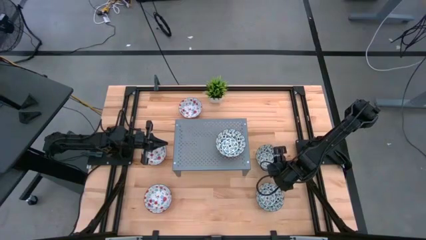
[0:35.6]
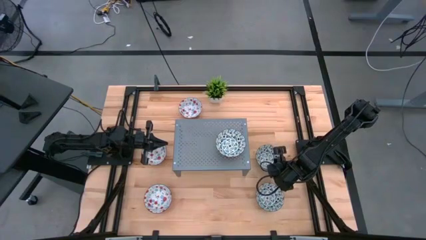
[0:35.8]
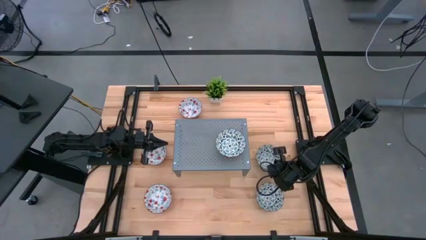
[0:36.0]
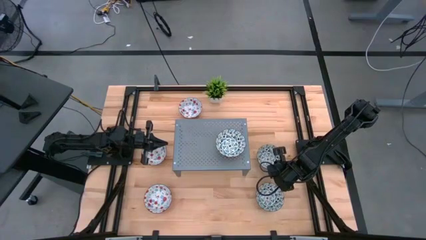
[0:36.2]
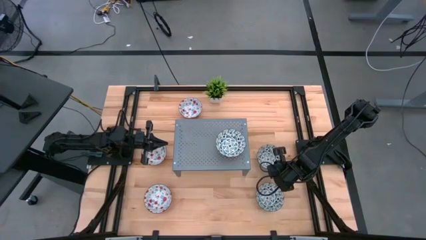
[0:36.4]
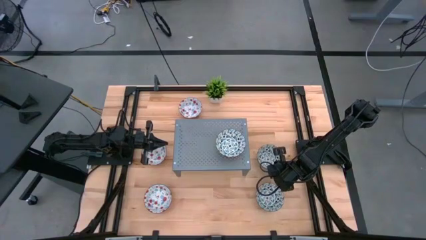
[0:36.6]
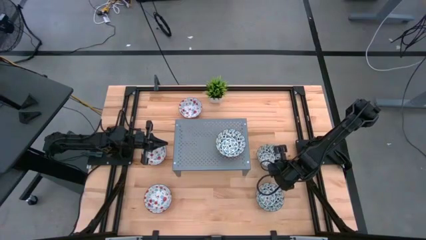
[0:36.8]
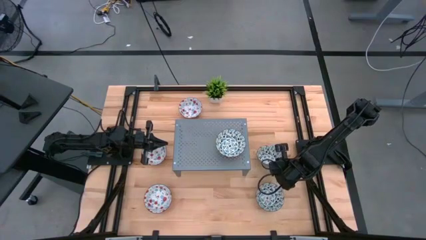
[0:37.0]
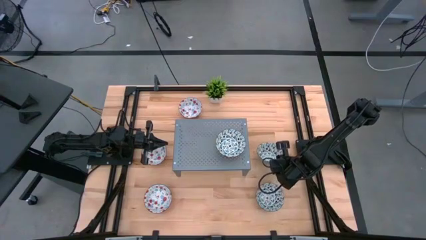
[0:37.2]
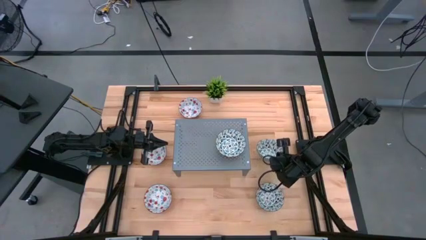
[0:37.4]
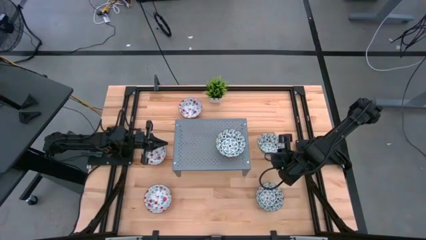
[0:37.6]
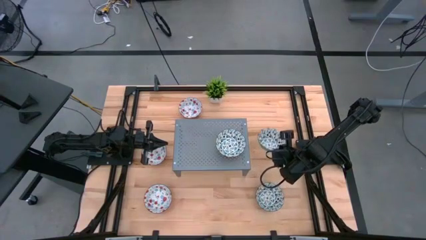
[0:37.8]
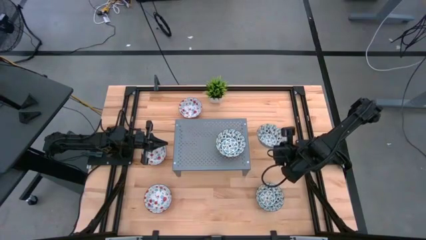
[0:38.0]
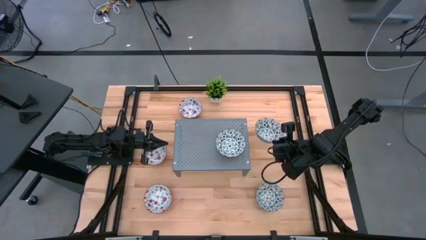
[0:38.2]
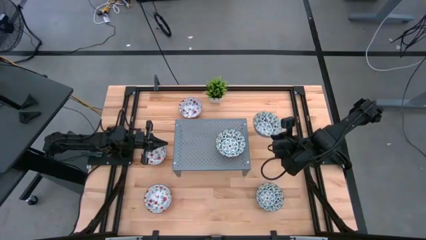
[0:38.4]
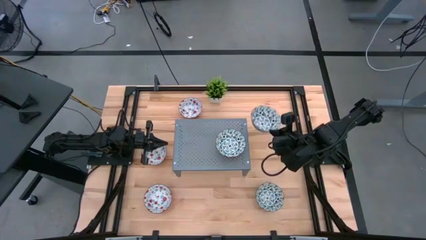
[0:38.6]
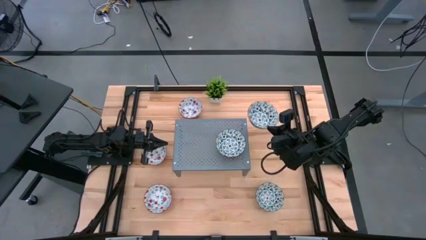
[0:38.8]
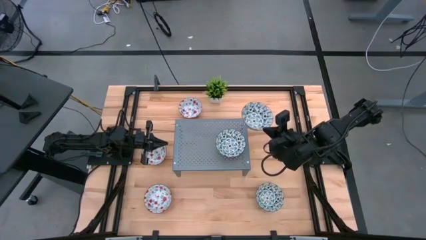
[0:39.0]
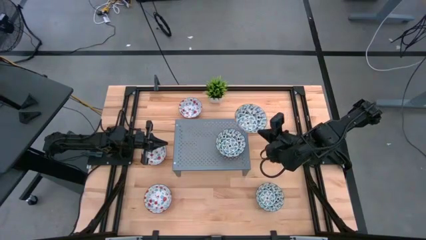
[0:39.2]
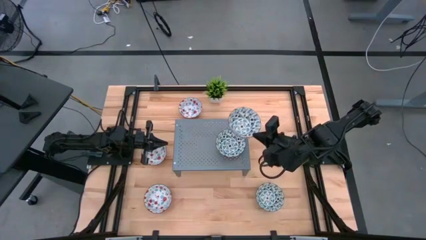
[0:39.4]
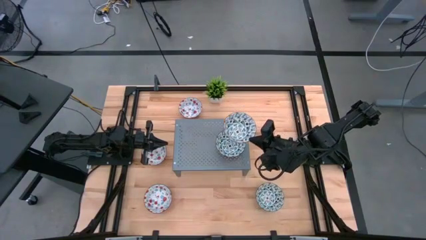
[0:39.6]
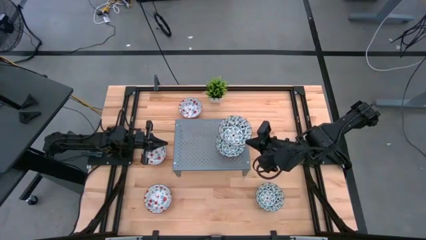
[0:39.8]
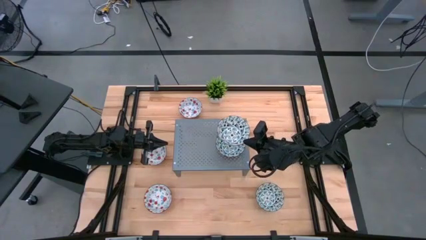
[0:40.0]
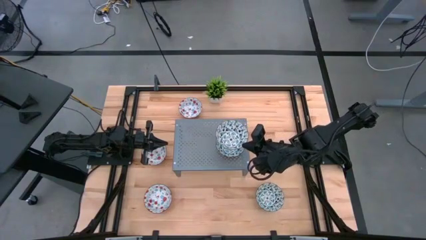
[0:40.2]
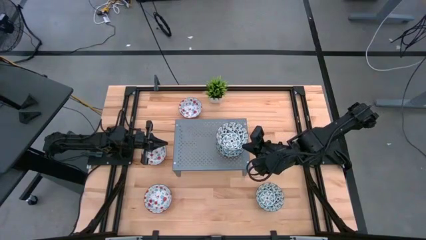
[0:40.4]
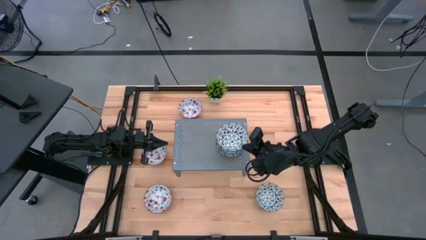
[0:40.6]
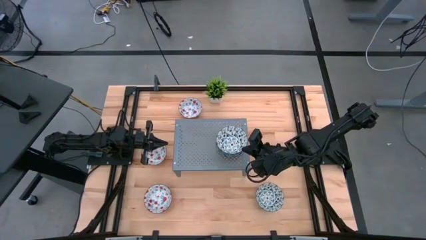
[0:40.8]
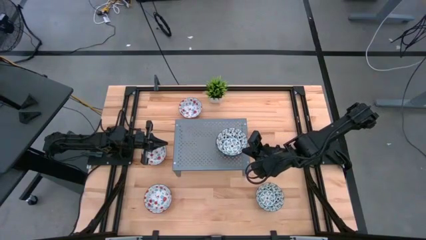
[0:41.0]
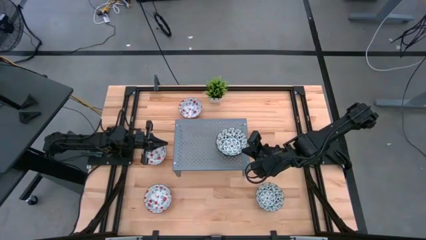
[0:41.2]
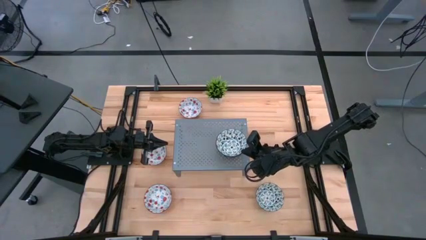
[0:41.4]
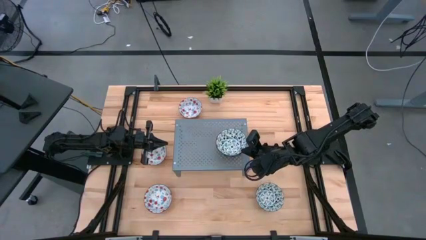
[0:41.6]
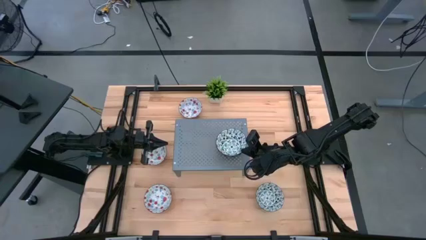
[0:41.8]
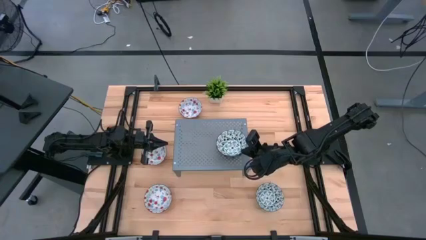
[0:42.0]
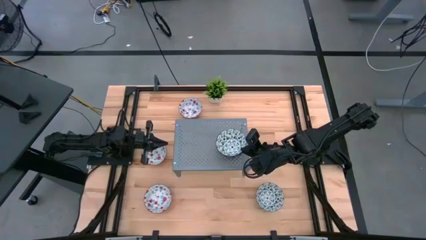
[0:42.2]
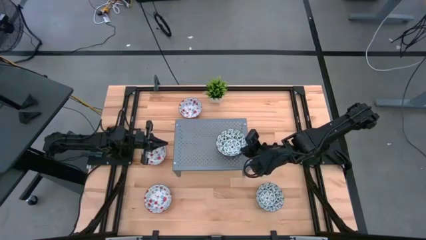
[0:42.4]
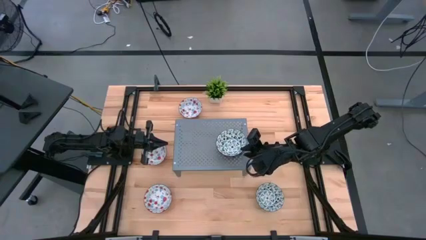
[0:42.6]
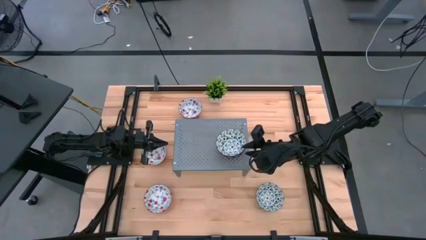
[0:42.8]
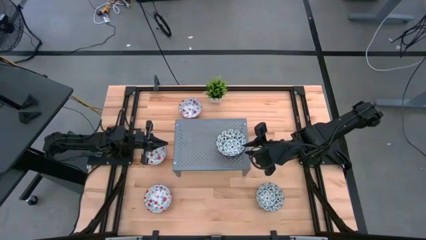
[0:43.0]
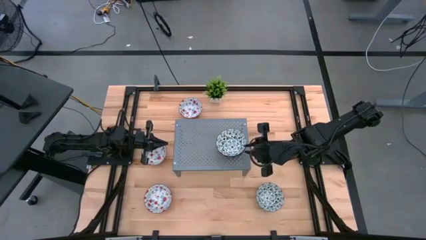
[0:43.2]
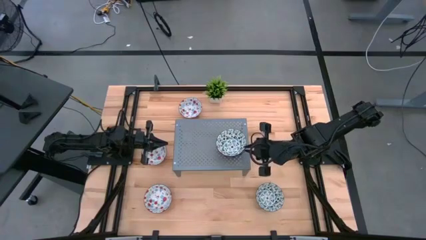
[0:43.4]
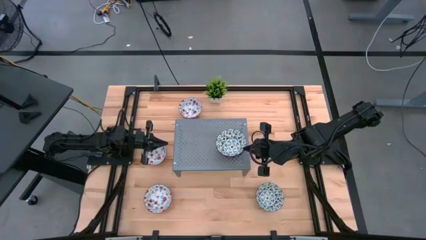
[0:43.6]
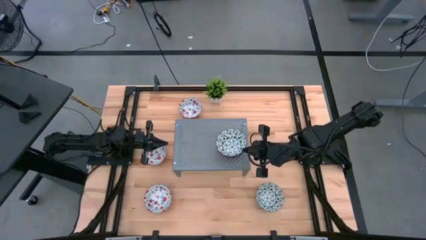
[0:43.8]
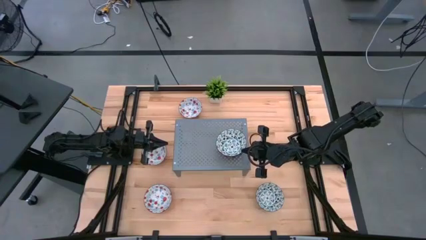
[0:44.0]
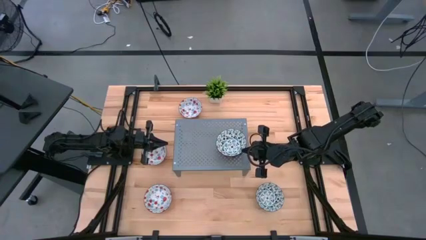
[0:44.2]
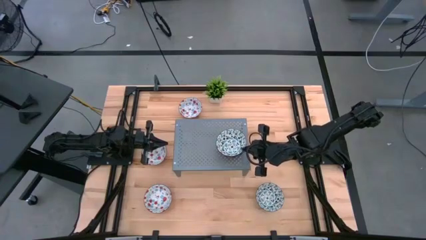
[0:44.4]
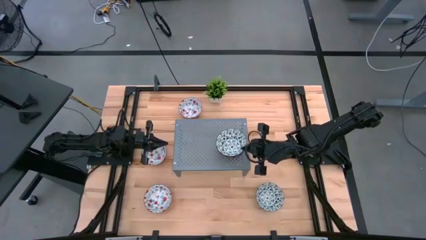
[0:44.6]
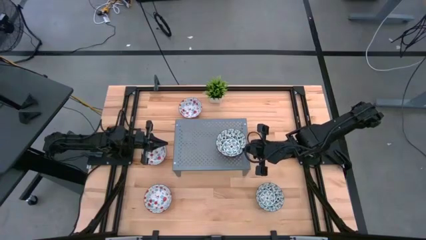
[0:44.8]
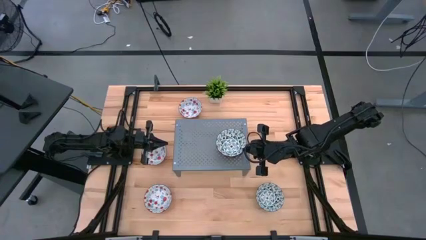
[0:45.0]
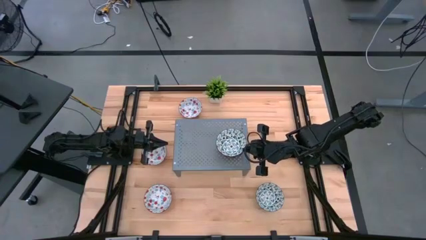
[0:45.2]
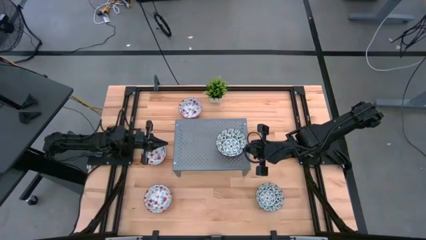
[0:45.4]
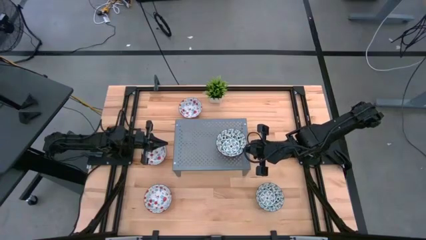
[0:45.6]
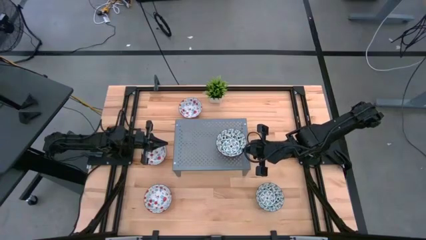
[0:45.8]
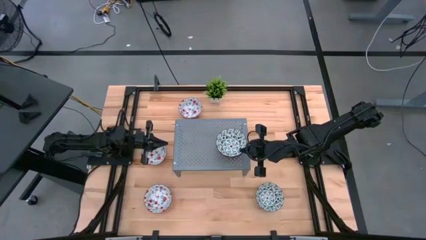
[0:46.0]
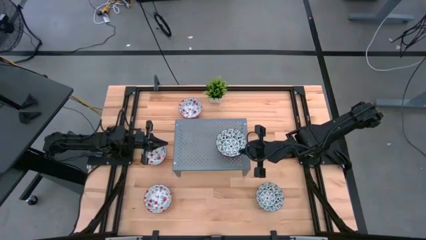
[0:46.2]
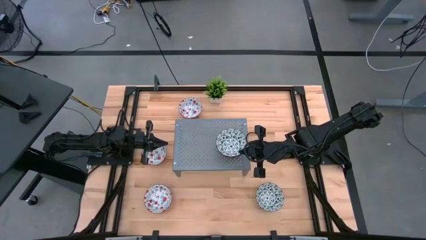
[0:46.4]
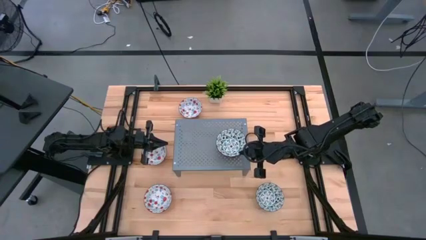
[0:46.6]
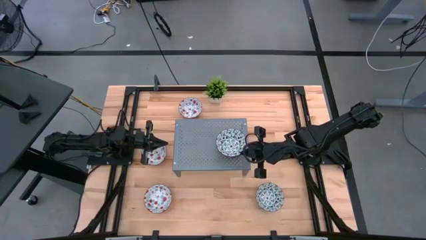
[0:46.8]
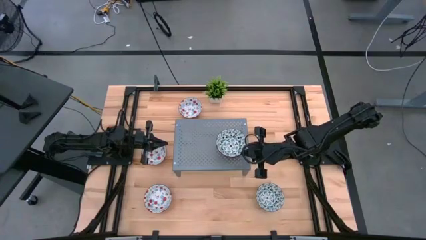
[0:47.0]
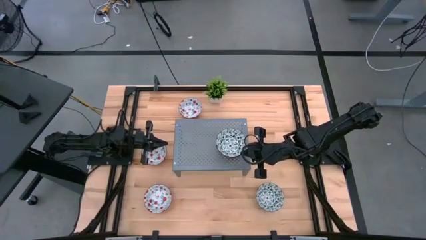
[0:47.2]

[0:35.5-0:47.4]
Task: Pick & Place Mini bowls
Stack the top blue patterned bowl on the other blue patterned bowl on the shelf
